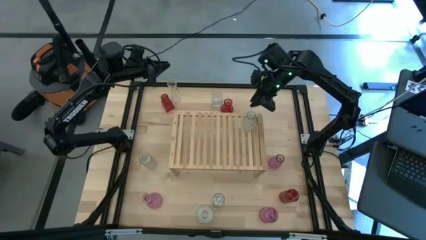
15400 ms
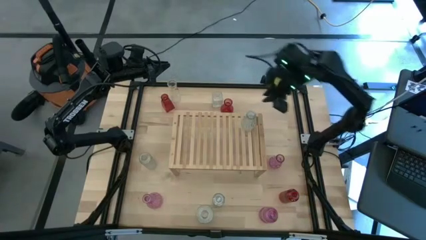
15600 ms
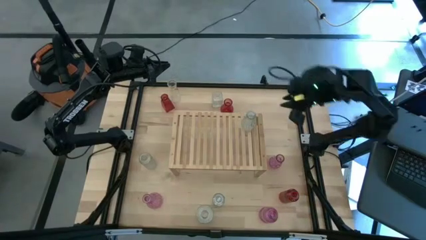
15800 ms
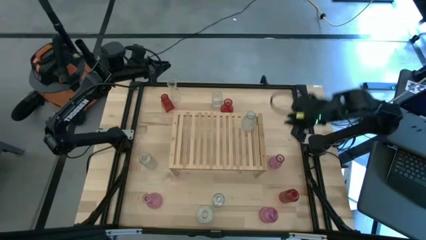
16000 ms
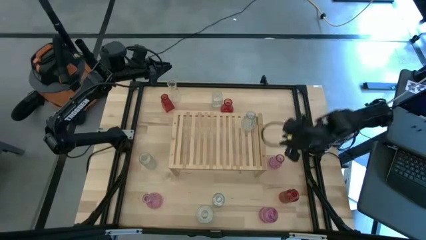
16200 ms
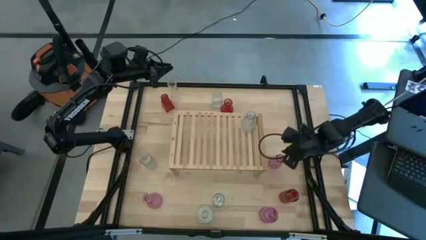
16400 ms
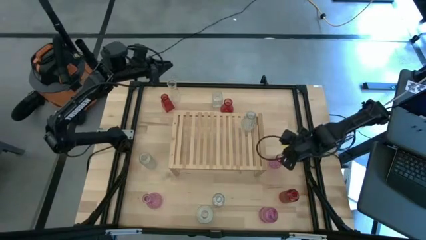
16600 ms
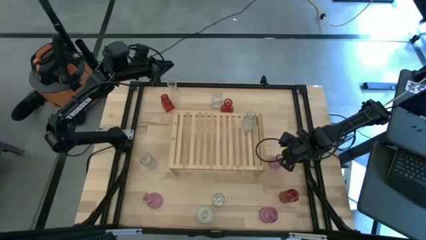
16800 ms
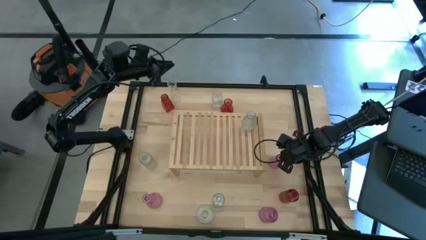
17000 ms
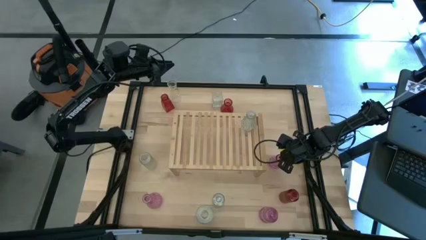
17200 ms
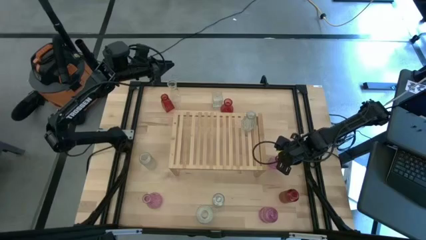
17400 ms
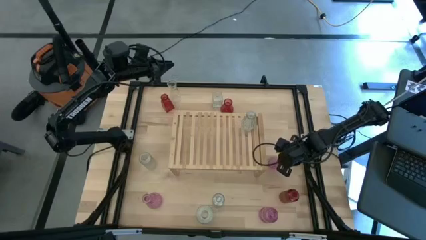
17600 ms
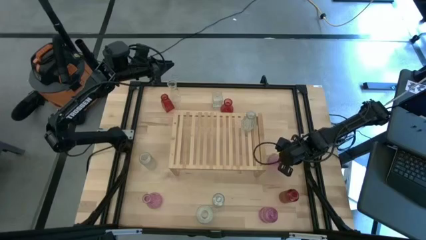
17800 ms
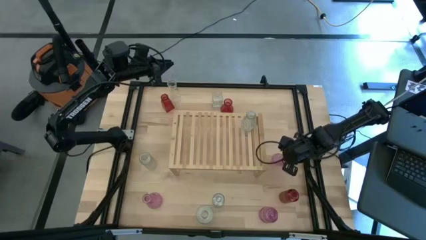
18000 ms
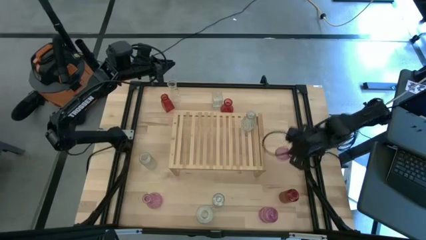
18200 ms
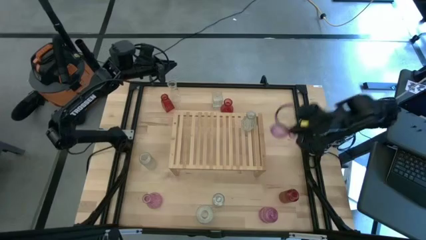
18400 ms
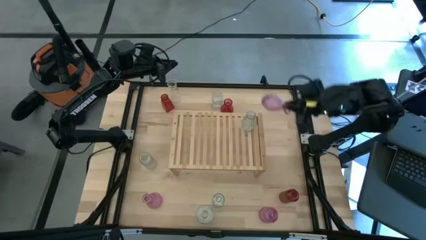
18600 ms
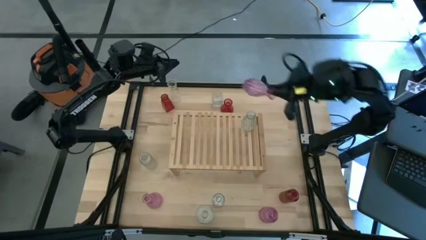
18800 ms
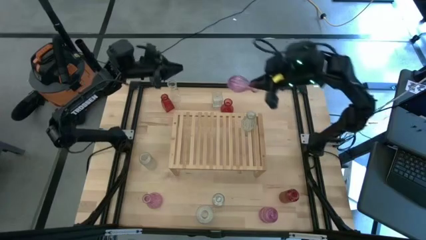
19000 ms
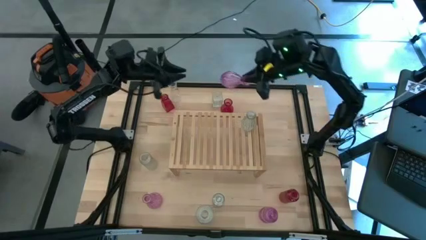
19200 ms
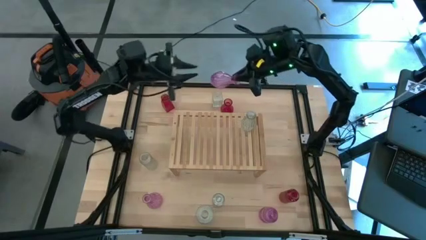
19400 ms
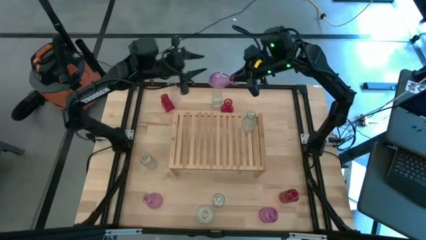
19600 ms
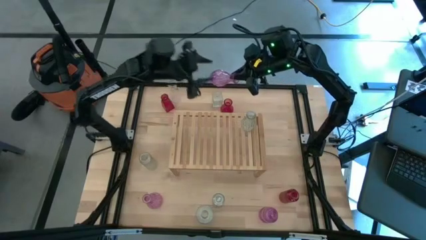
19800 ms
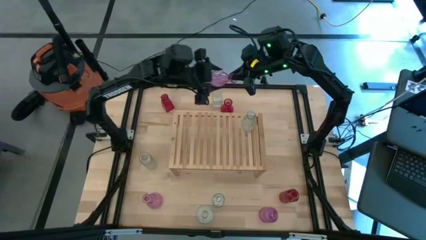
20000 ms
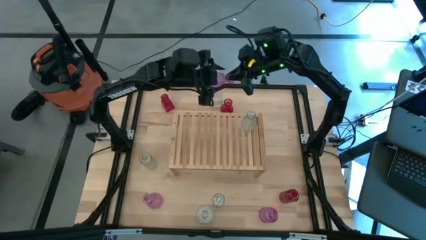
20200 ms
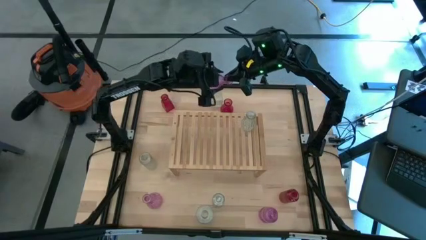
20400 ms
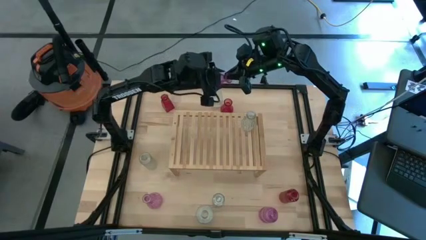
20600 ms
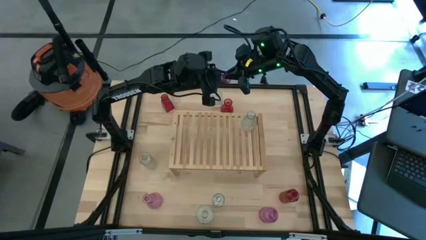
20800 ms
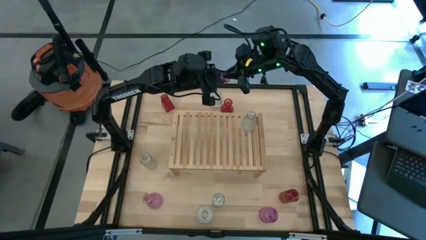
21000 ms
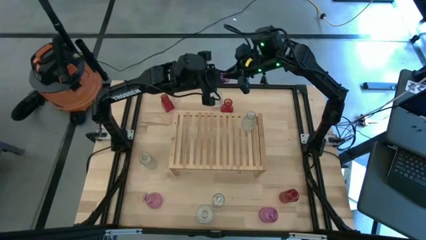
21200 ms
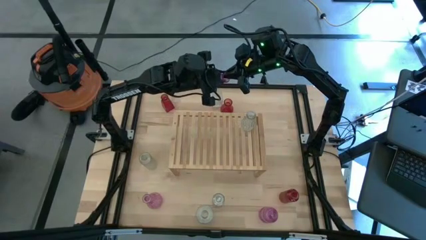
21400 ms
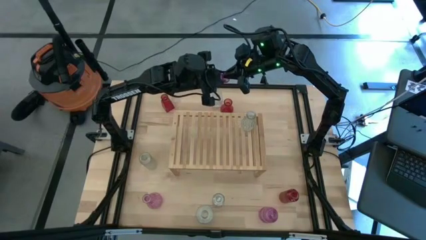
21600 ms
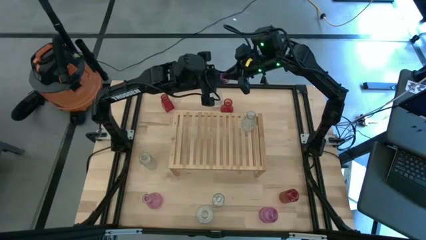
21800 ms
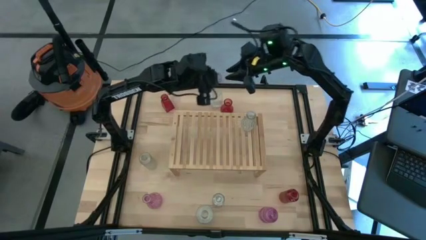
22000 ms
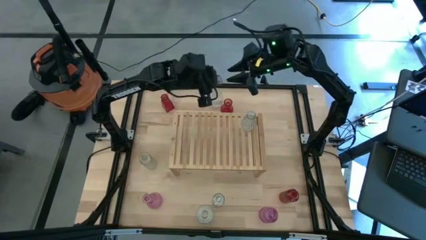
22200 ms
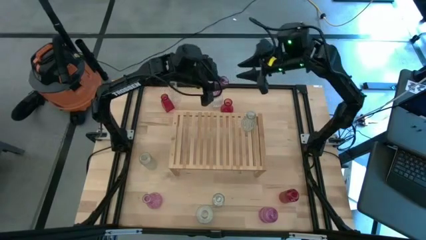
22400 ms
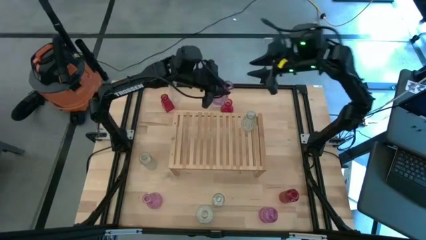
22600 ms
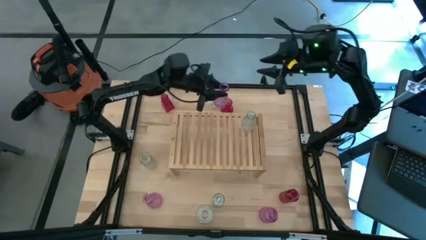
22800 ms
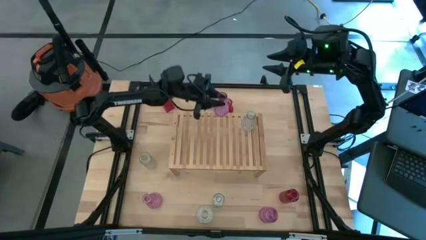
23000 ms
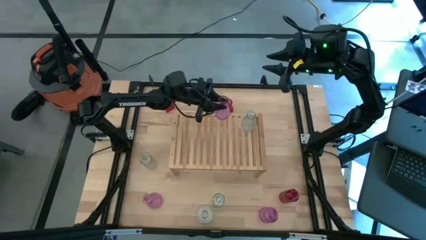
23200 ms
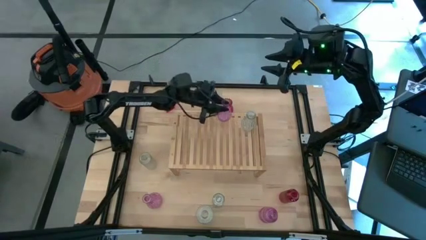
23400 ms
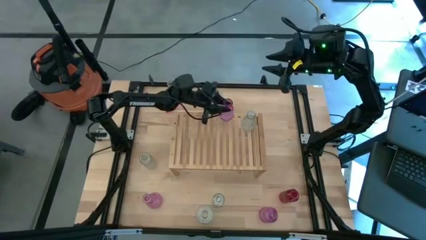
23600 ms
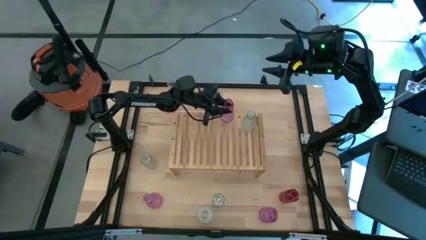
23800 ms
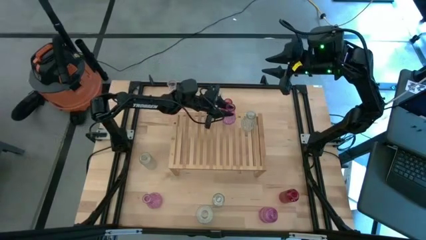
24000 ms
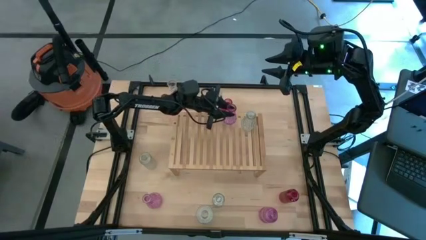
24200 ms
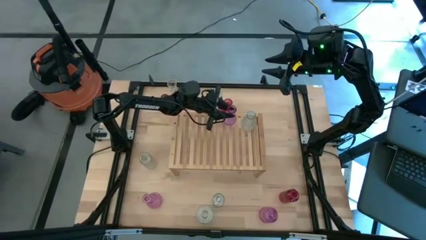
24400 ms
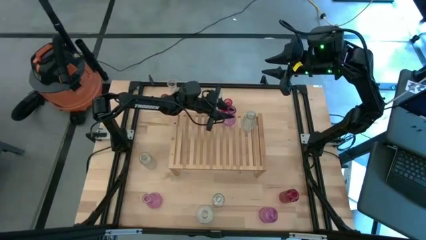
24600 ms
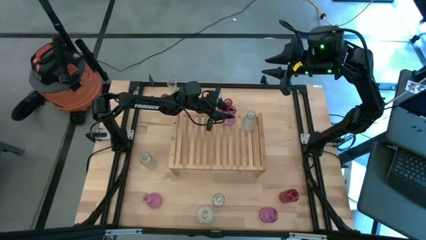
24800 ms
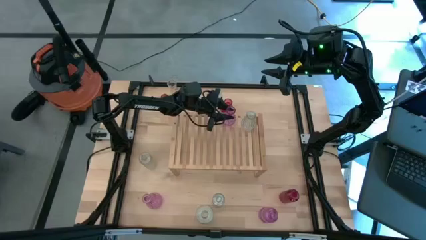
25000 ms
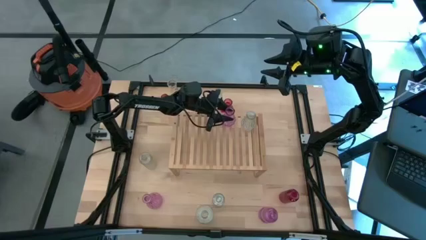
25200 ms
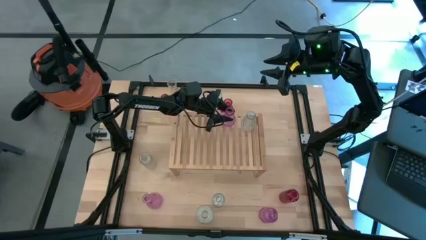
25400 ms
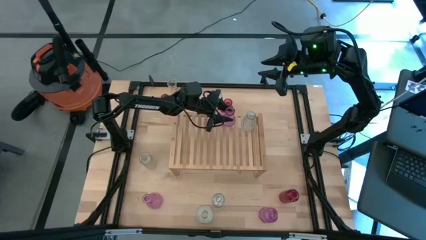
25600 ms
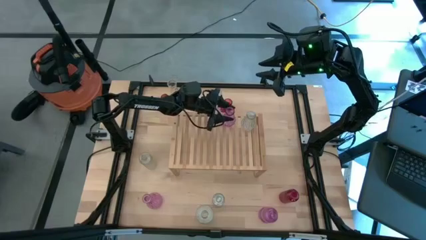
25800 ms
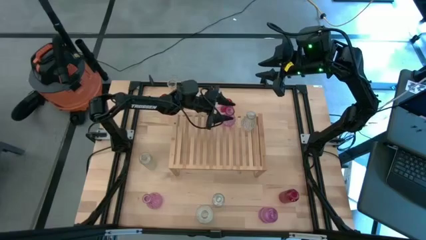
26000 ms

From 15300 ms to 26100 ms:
Task: sort vases onto shelf
Put the violet vase on the shelf

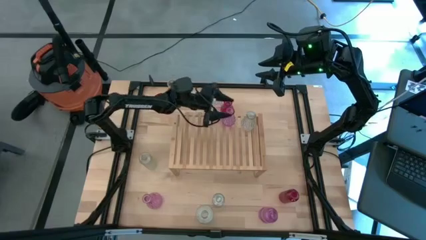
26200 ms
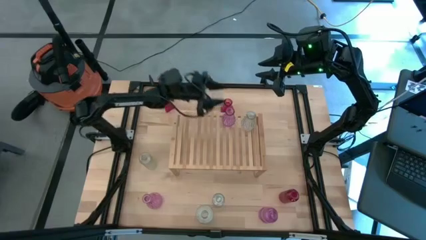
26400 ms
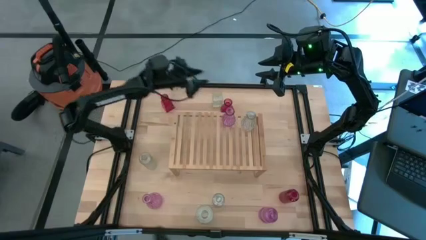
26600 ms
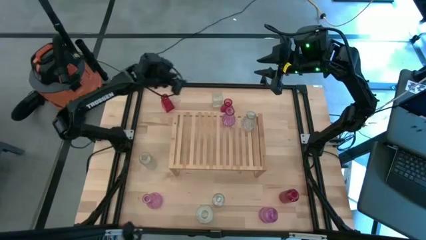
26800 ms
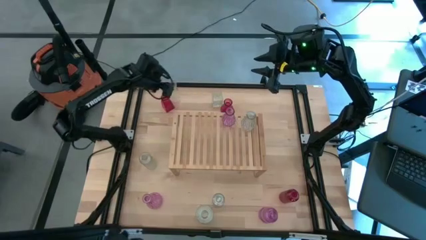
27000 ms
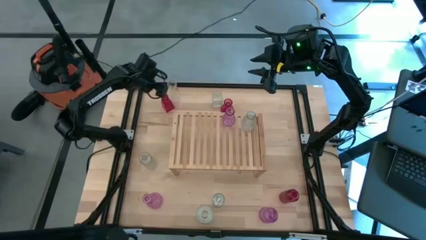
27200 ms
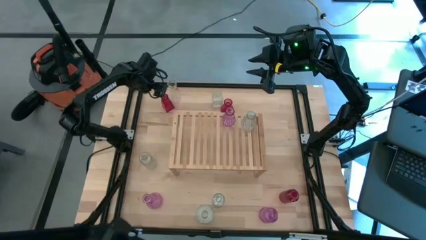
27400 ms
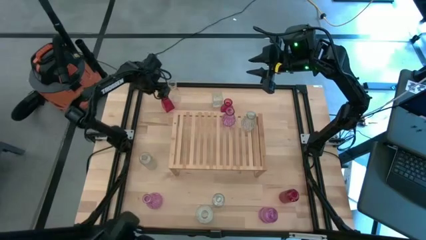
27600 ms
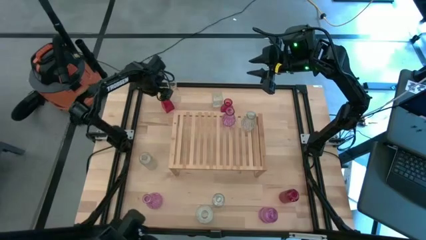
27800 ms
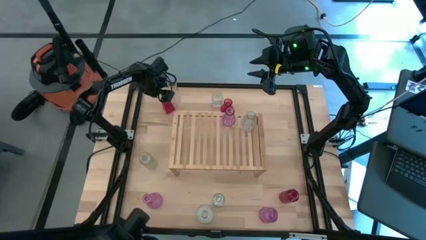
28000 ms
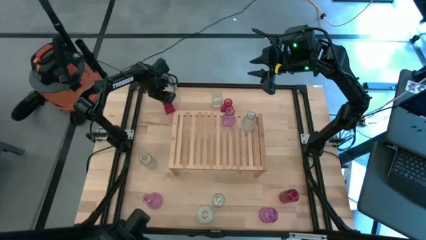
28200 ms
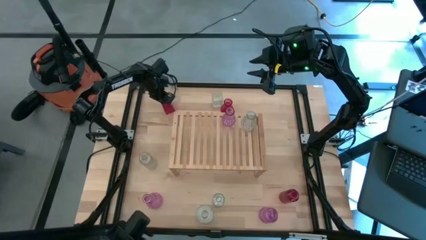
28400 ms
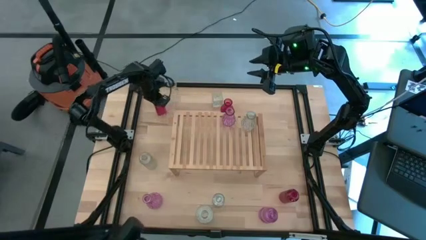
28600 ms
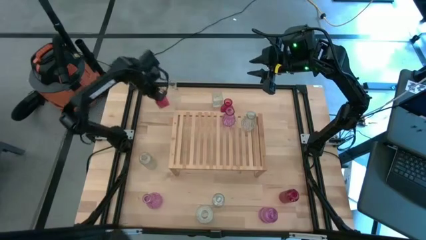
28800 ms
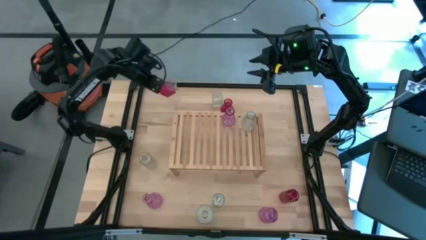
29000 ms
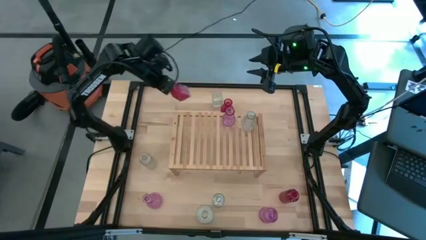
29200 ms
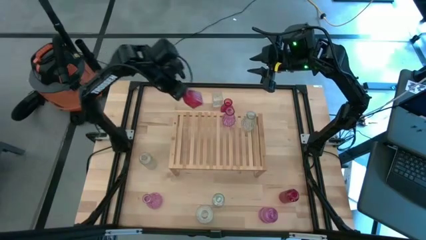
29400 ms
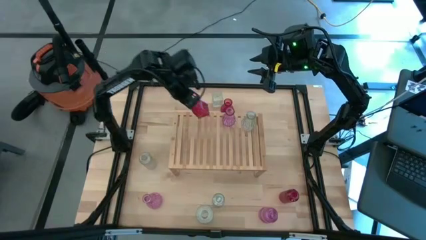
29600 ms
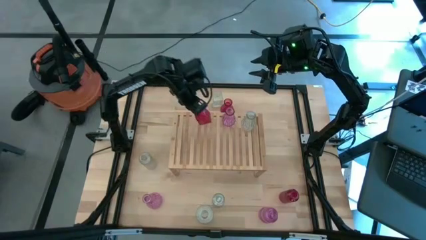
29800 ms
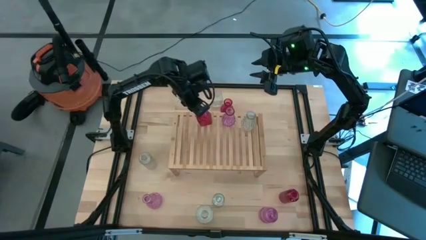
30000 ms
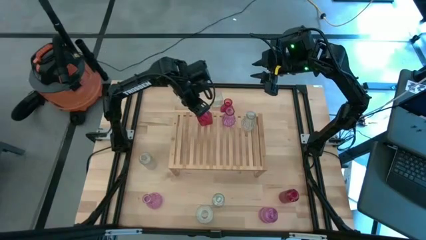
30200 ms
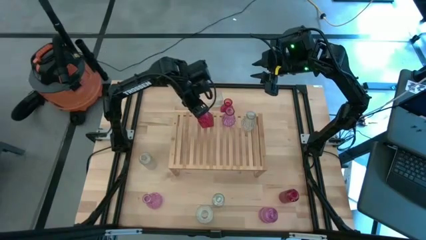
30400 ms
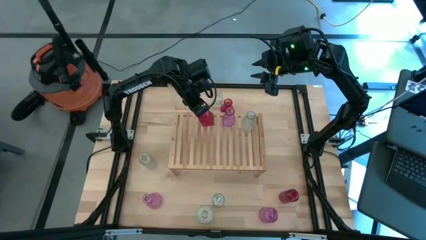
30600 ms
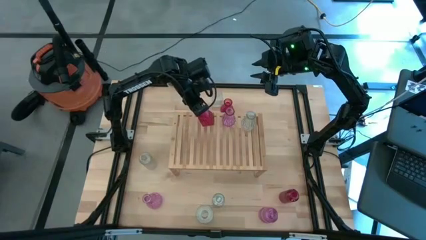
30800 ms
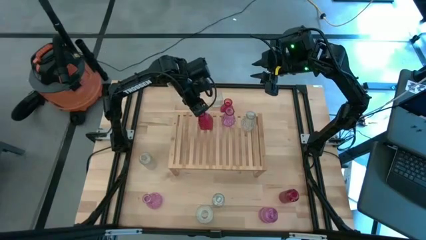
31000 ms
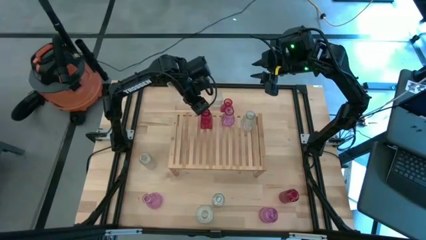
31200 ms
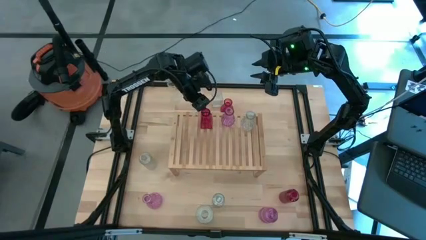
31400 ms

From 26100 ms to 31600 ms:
Put the red vase on the shelf
